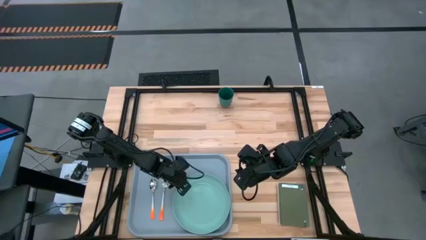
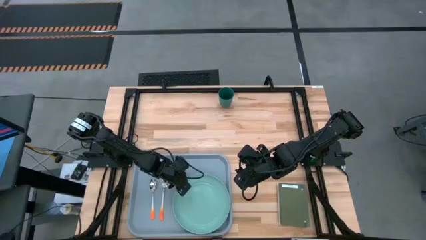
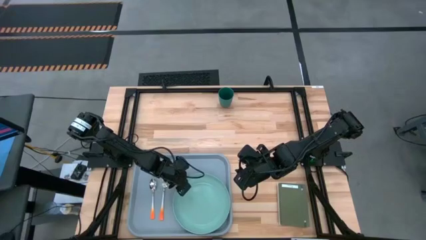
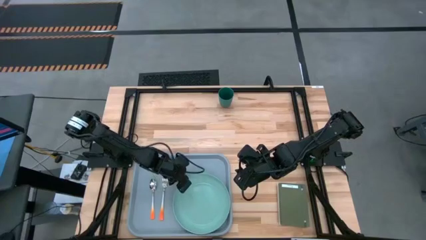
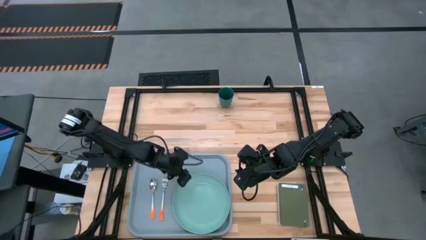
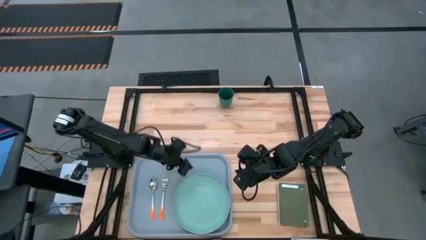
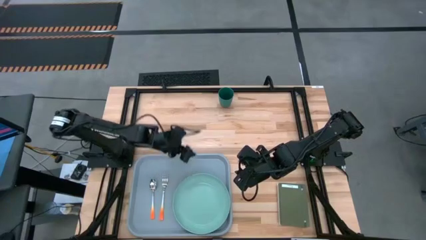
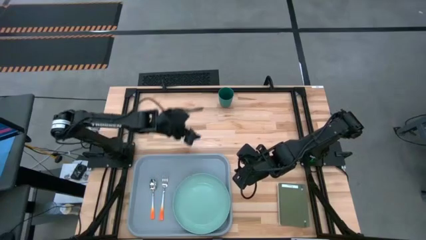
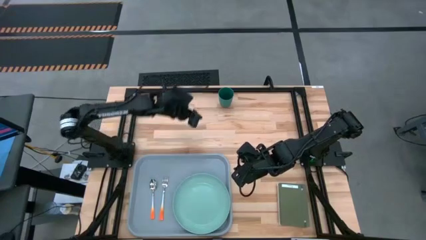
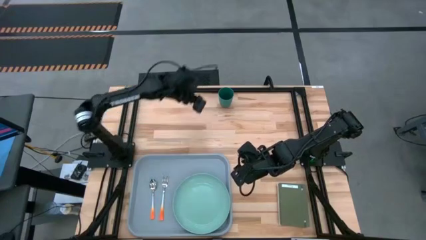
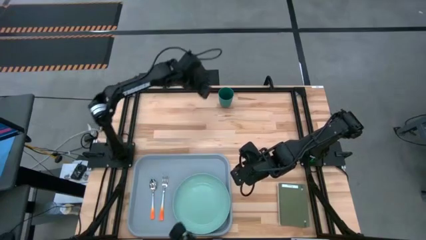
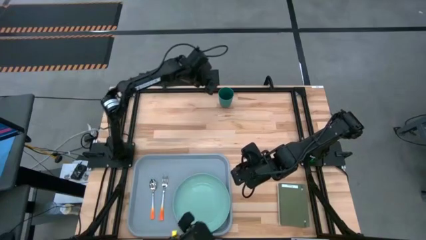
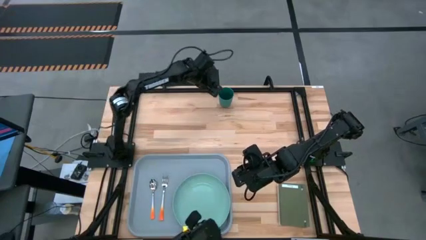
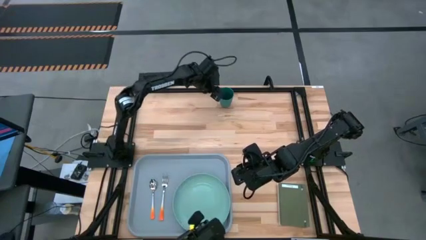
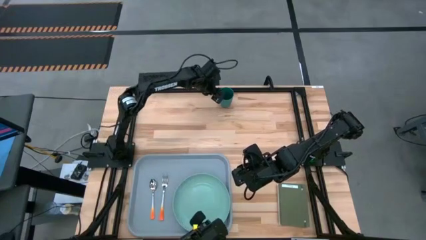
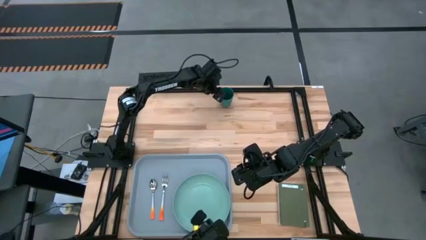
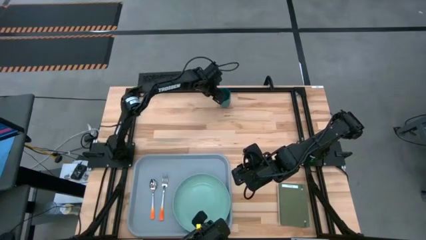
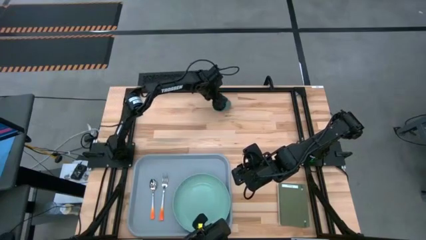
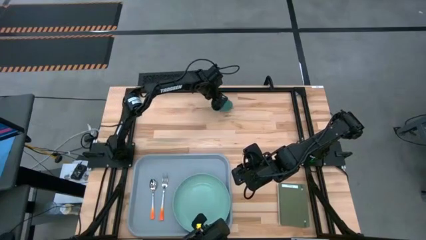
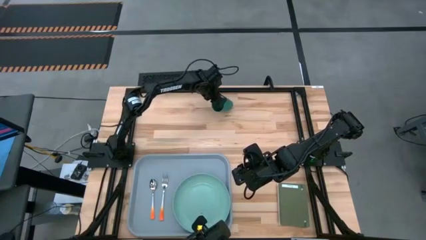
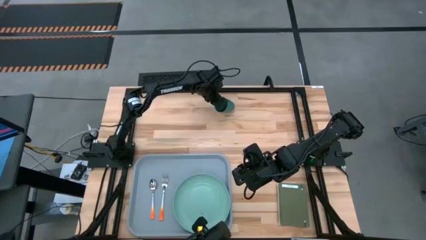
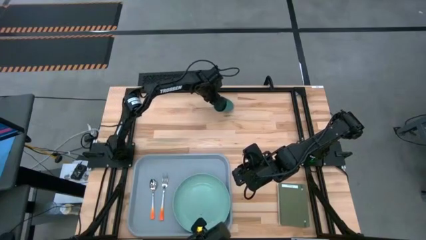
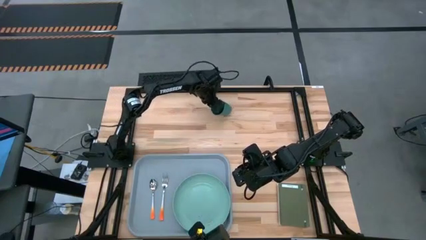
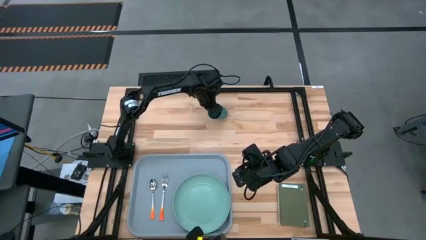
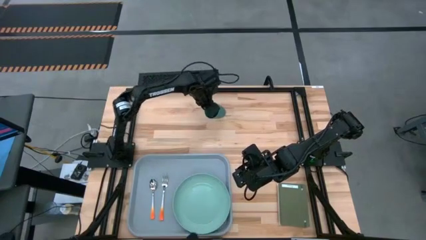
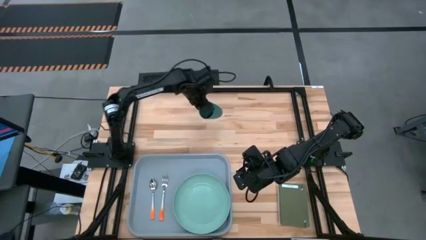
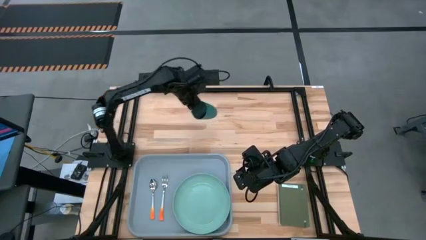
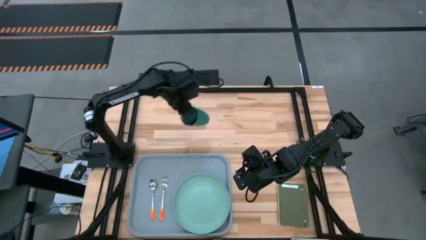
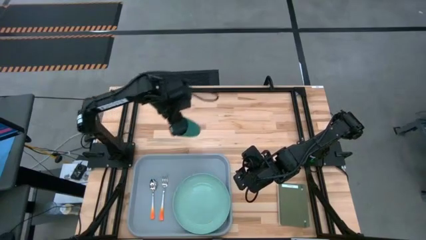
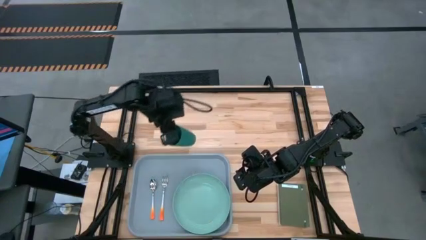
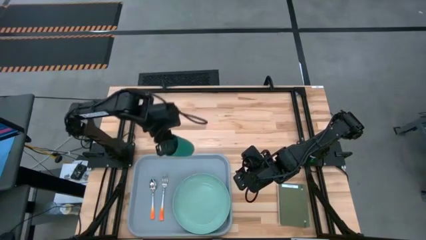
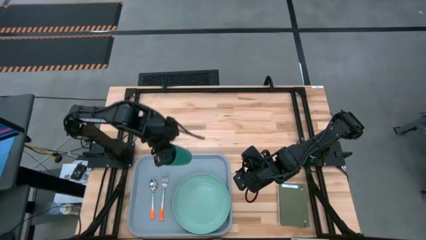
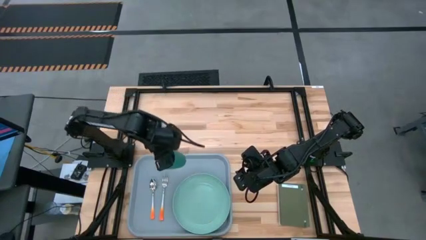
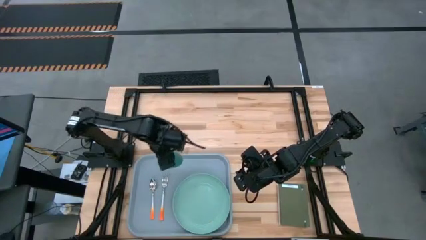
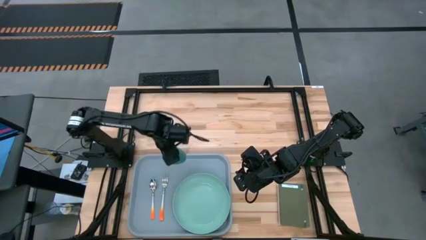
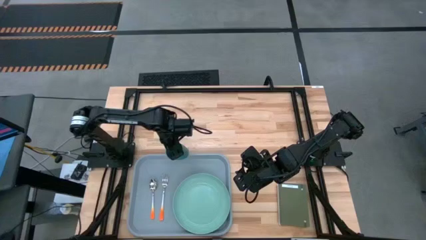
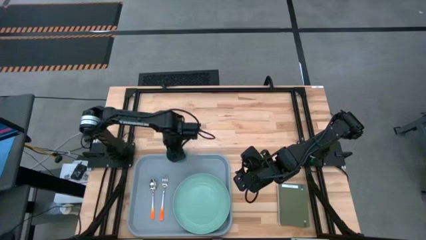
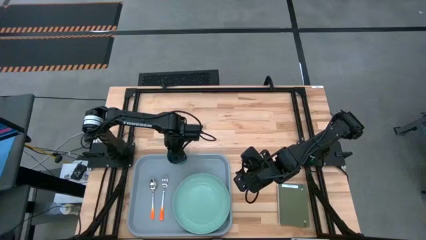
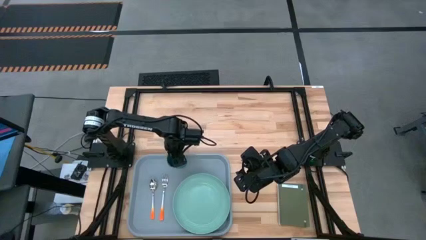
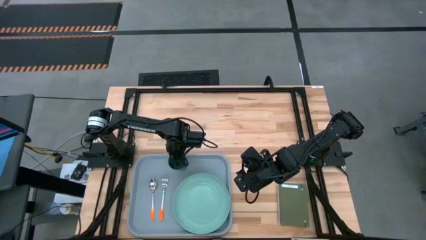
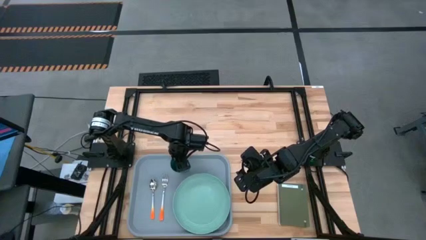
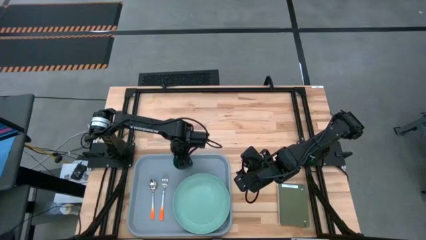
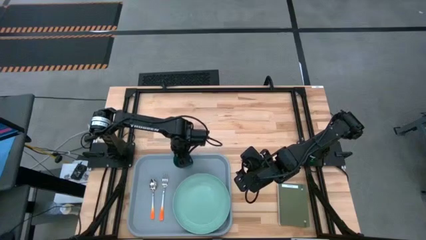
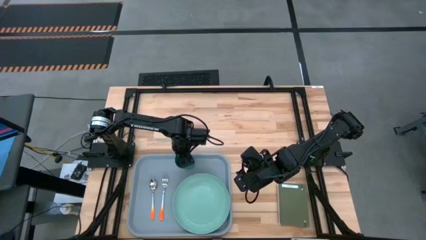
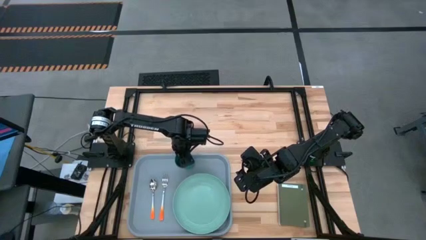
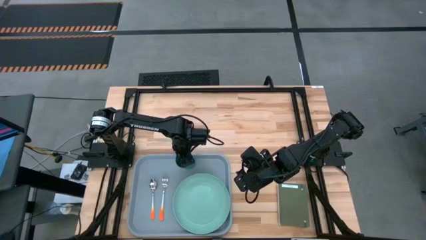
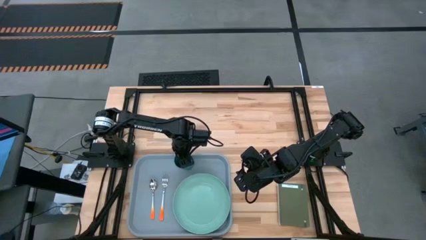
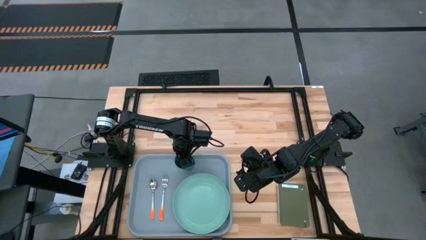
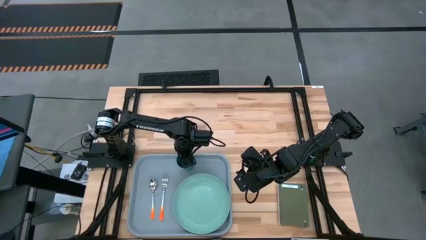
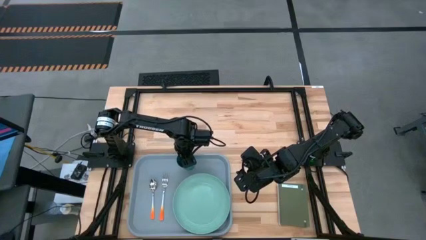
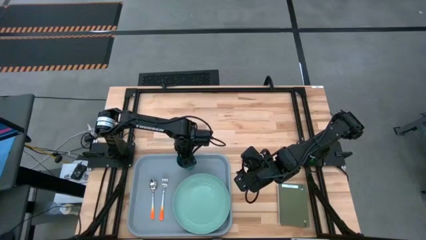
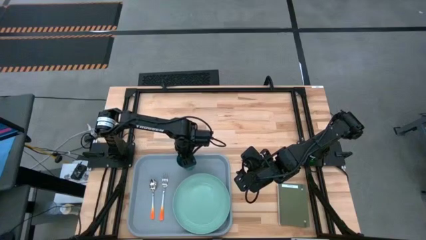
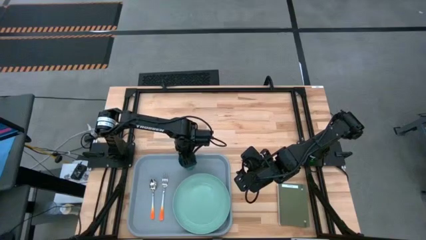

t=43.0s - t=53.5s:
Task: Pick and place plate/cup/fork/spoon on tray
Put the green cup on the gray tray to the top left of the green plate

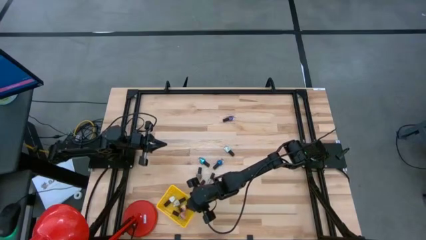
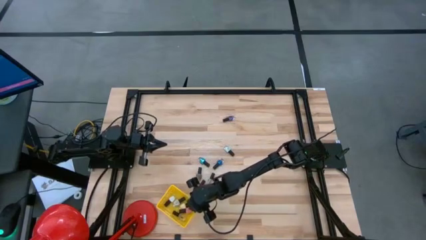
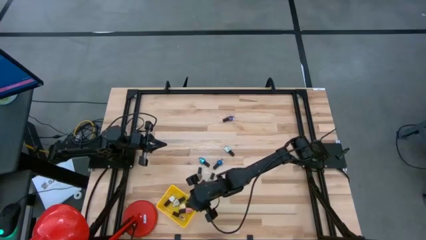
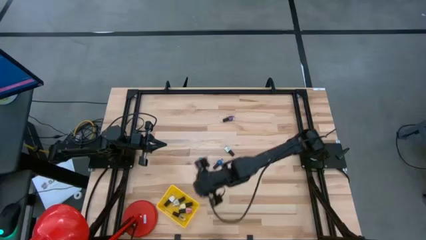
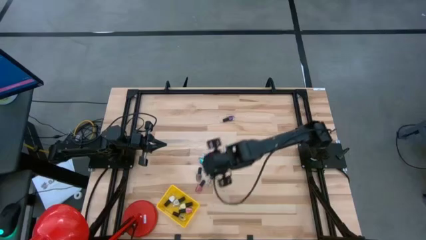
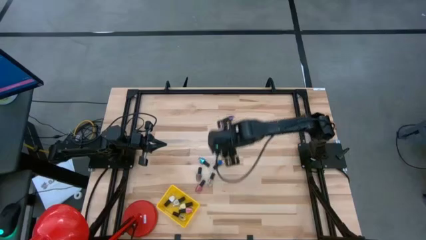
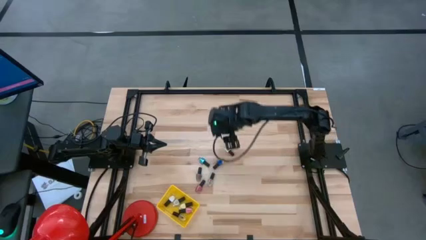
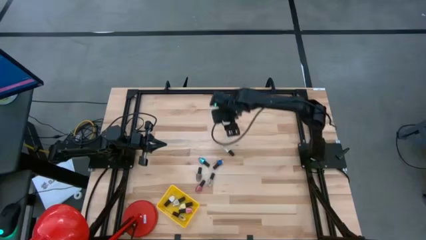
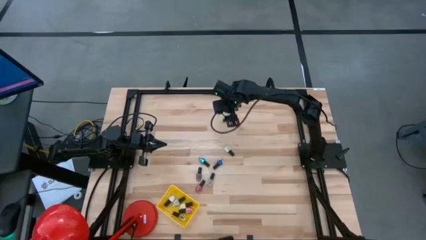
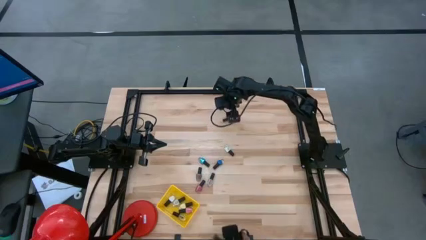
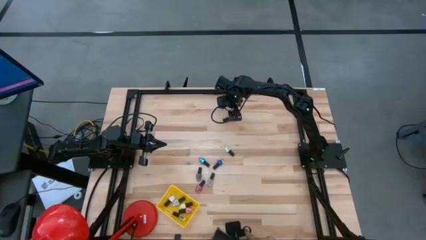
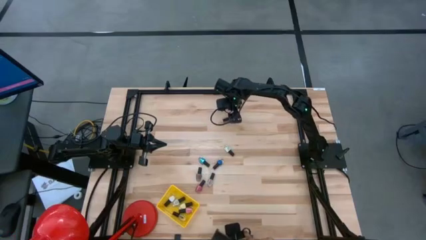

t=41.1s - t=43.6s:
Task: Pick & Place Nail Polish
Put the purple nail polish into the yellow basket

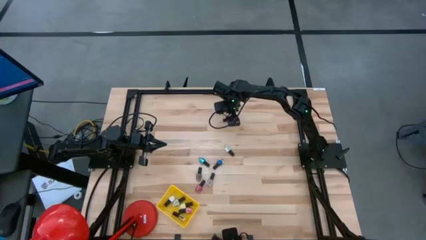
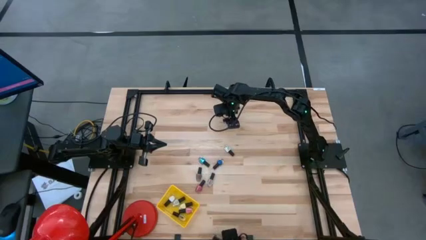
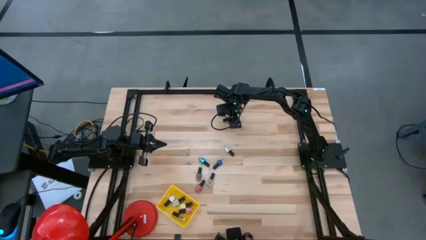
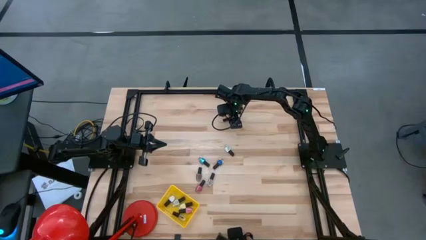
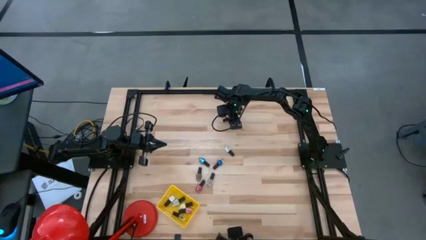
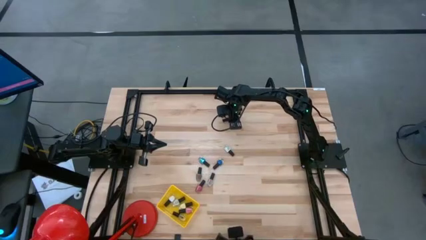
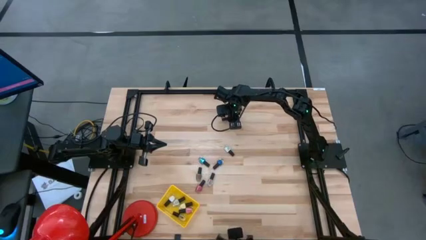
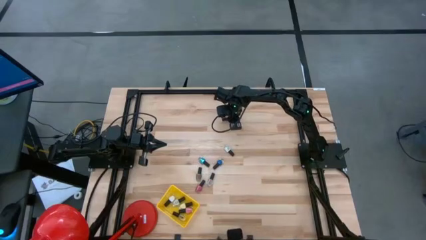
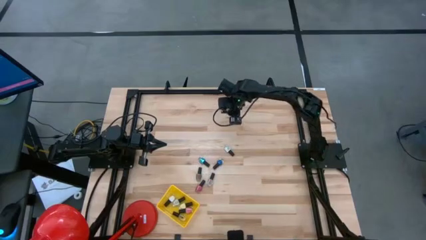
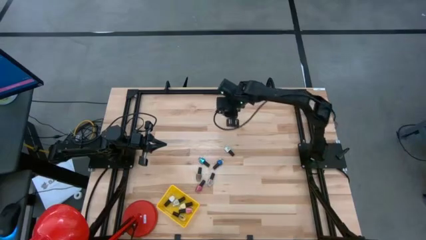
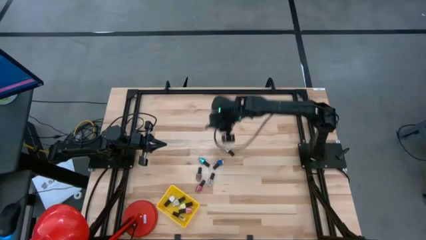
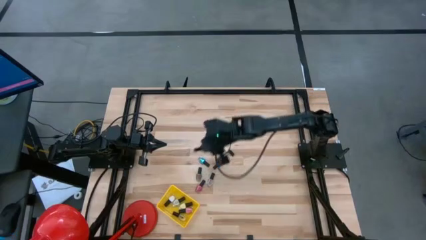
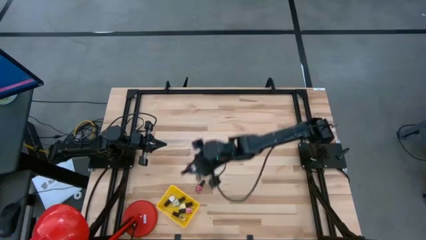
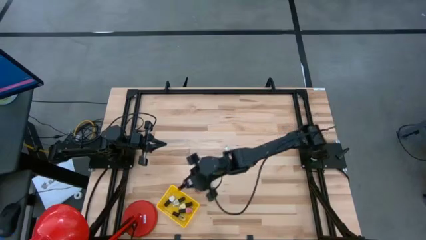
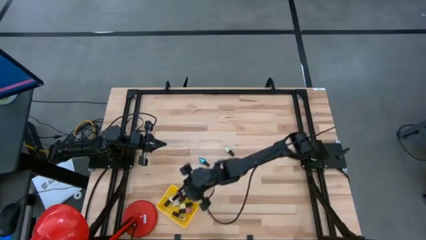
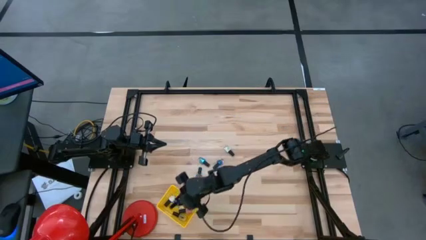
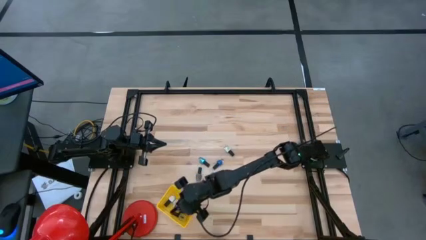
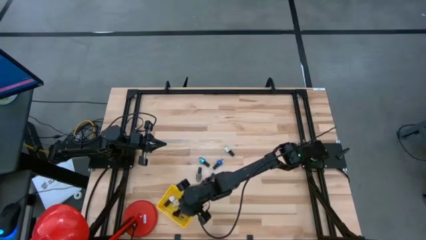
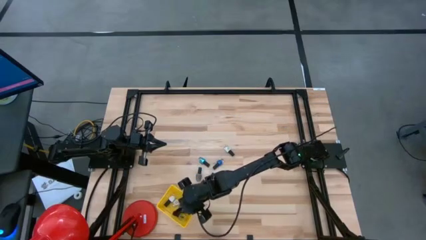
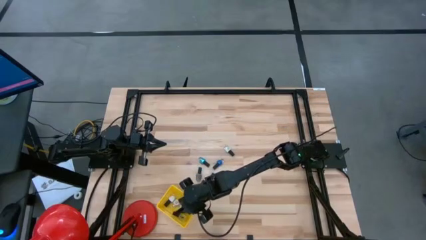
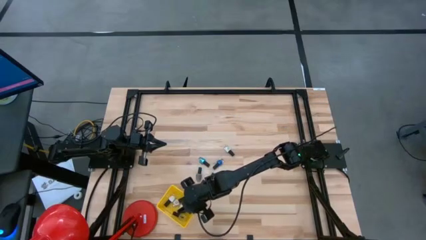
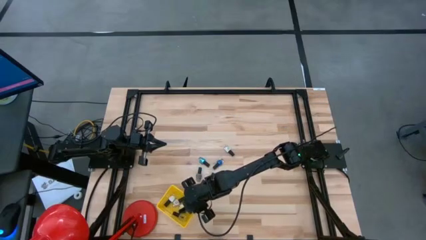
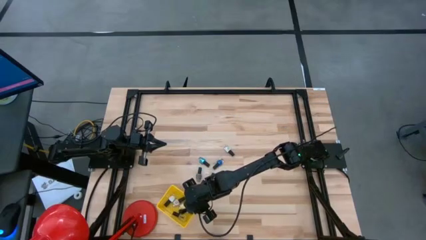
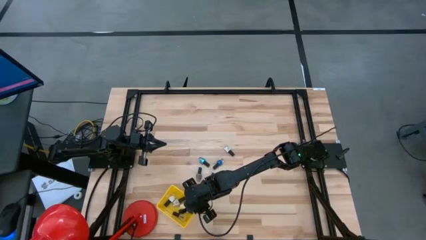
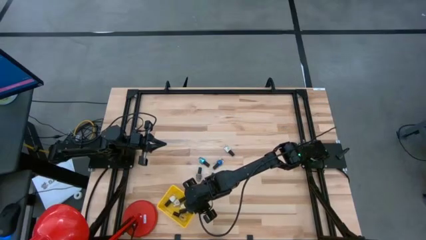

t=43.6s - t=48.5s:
Put the purple nail polish into the yellow basket
